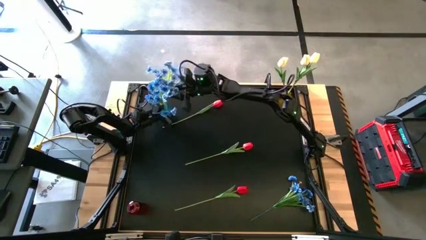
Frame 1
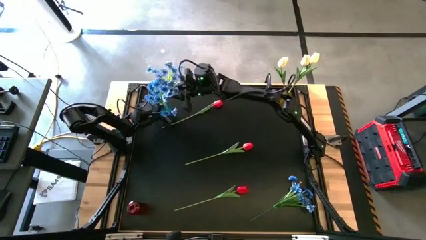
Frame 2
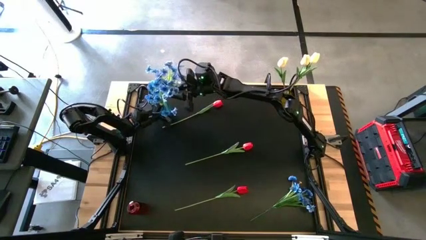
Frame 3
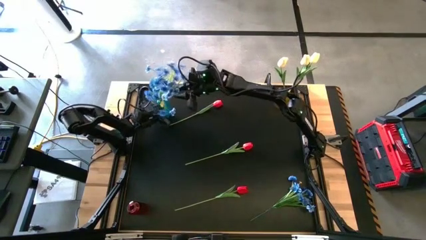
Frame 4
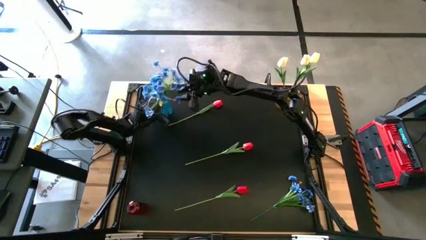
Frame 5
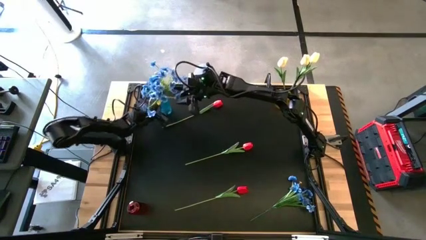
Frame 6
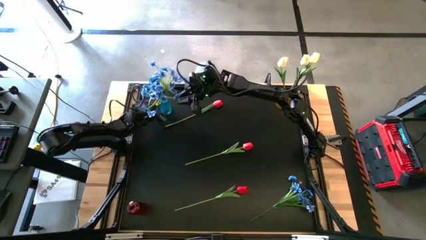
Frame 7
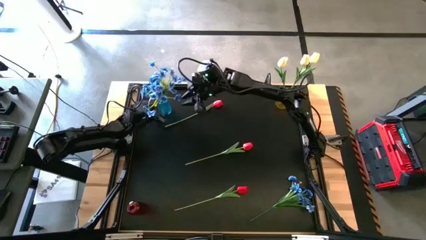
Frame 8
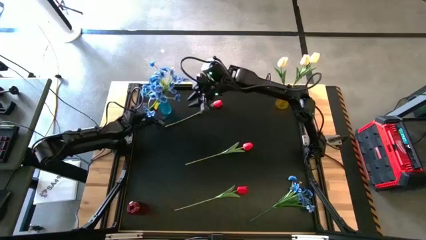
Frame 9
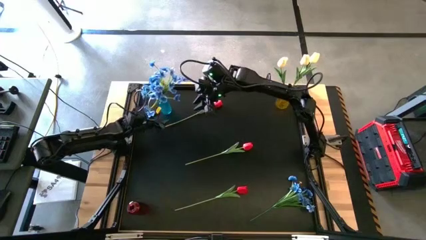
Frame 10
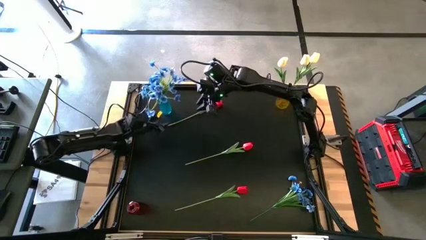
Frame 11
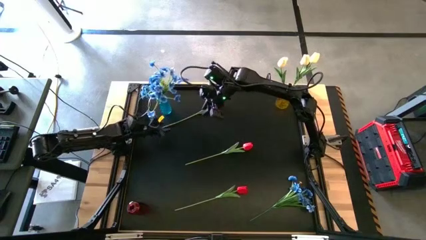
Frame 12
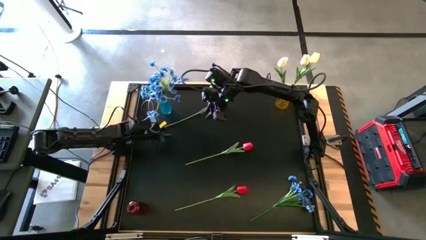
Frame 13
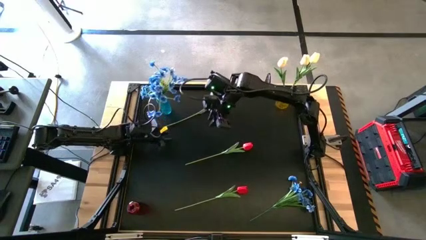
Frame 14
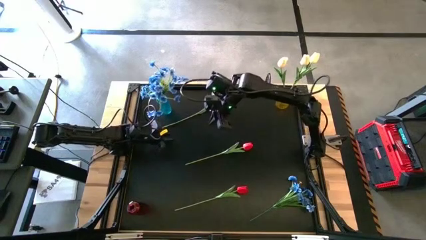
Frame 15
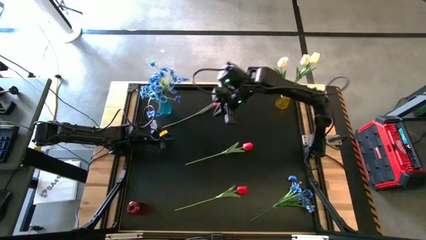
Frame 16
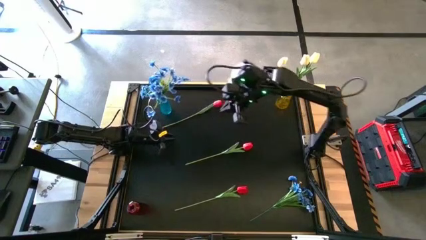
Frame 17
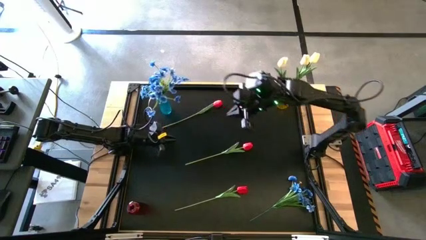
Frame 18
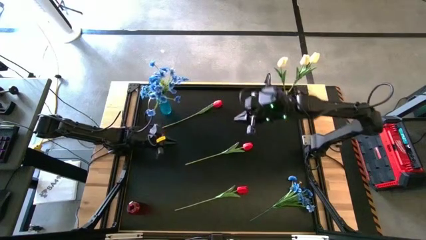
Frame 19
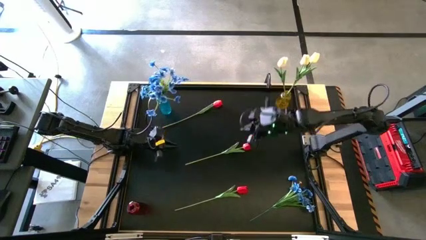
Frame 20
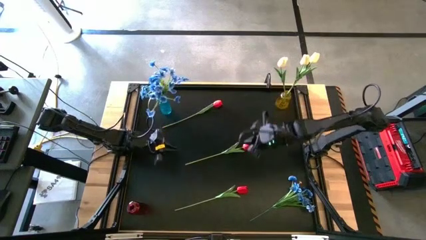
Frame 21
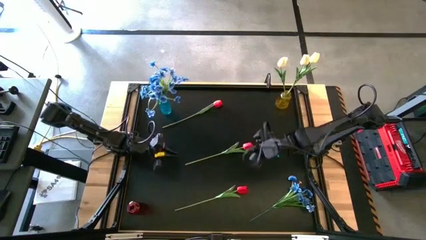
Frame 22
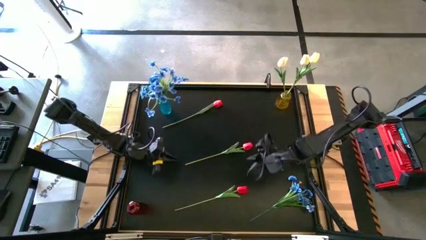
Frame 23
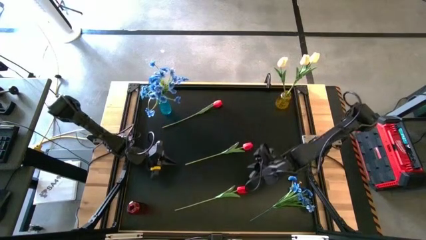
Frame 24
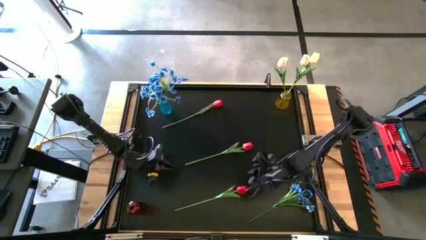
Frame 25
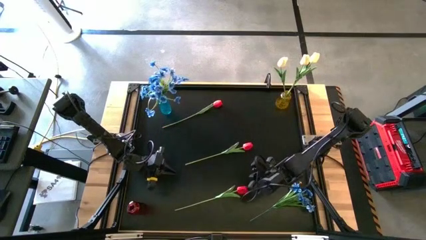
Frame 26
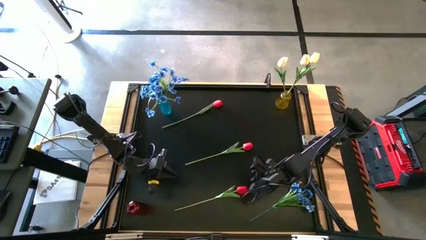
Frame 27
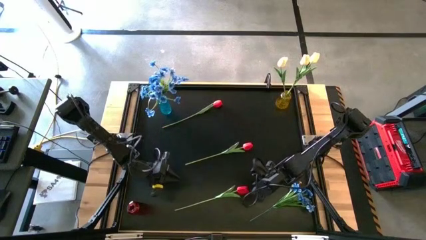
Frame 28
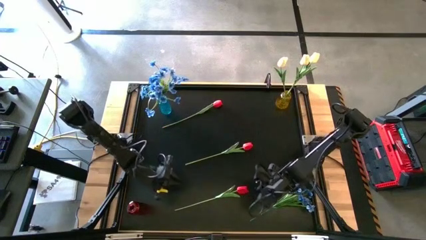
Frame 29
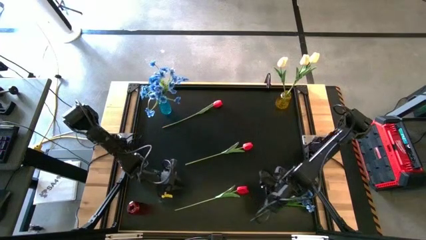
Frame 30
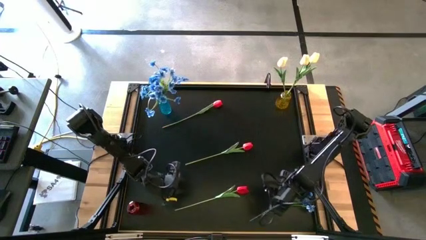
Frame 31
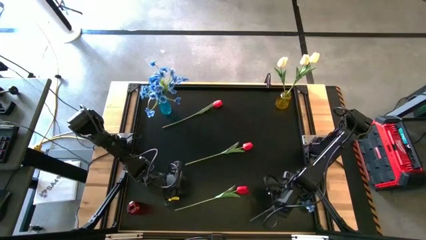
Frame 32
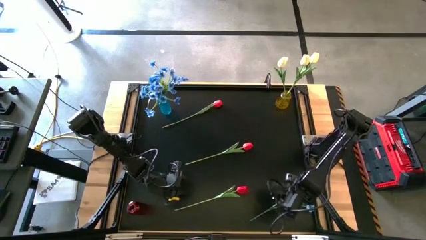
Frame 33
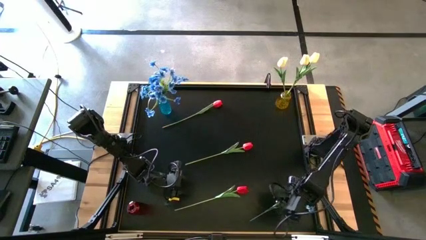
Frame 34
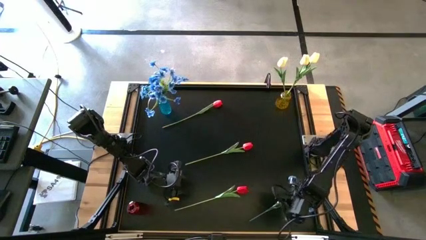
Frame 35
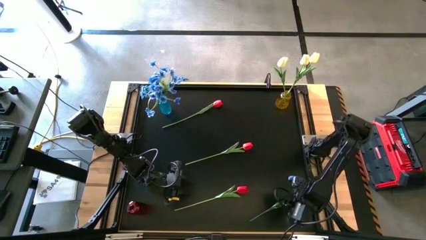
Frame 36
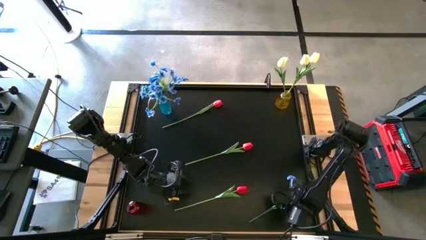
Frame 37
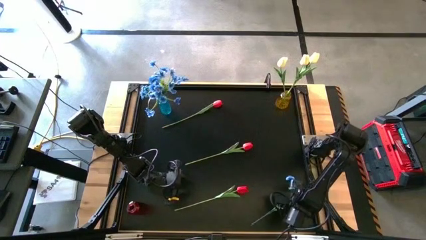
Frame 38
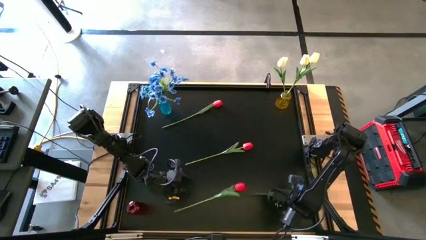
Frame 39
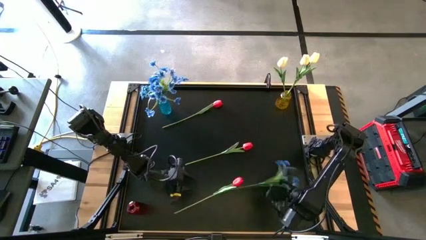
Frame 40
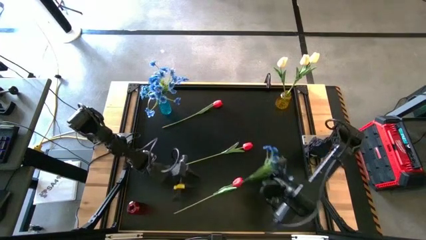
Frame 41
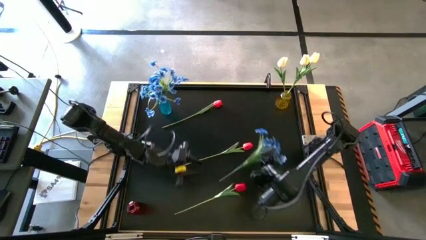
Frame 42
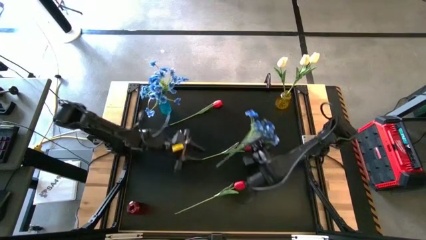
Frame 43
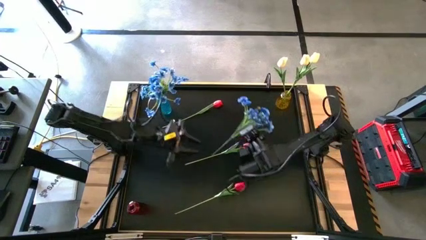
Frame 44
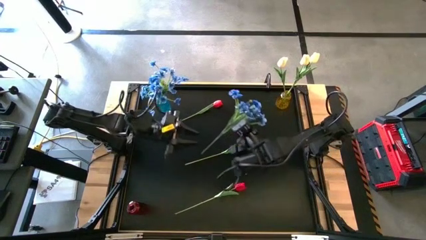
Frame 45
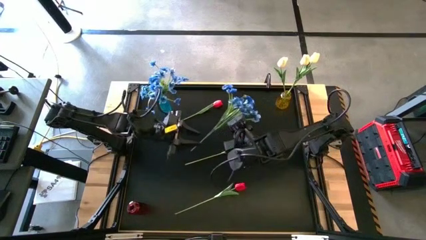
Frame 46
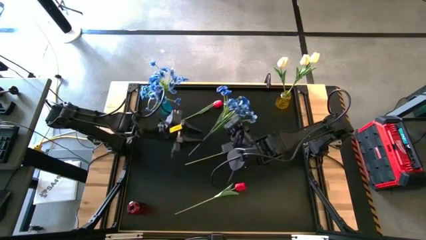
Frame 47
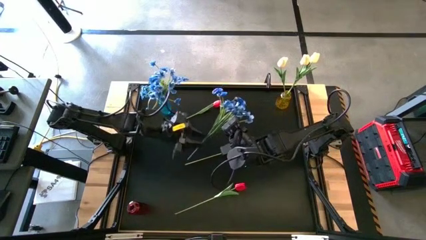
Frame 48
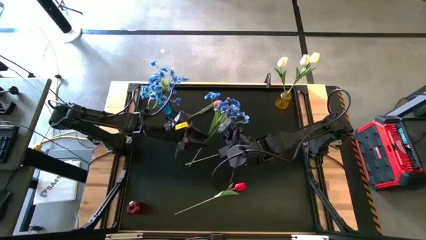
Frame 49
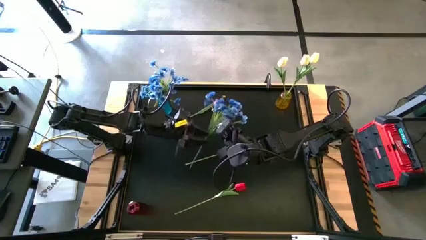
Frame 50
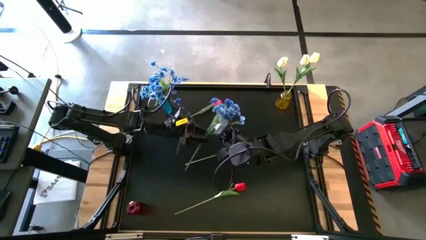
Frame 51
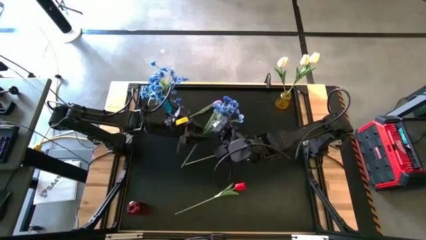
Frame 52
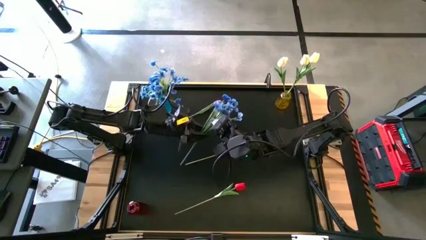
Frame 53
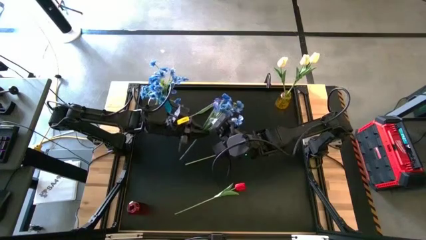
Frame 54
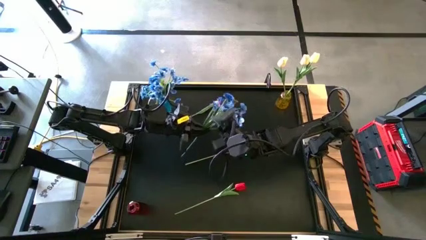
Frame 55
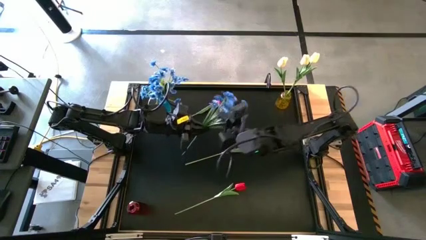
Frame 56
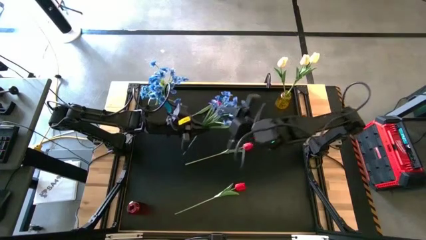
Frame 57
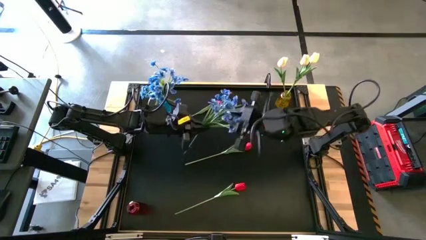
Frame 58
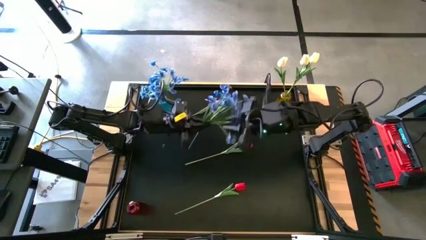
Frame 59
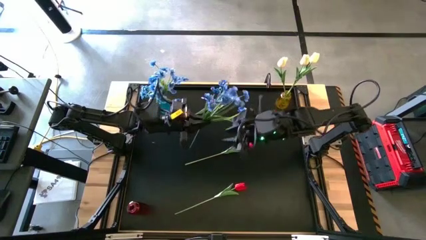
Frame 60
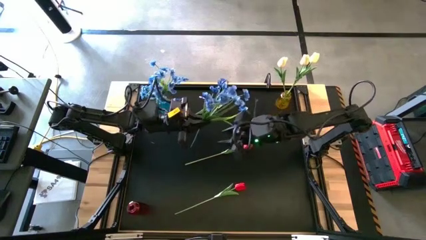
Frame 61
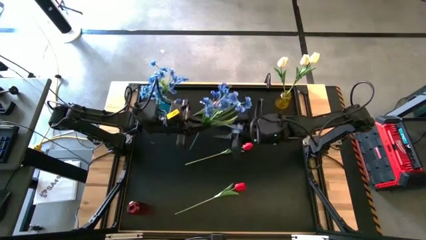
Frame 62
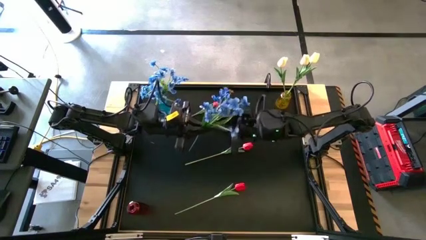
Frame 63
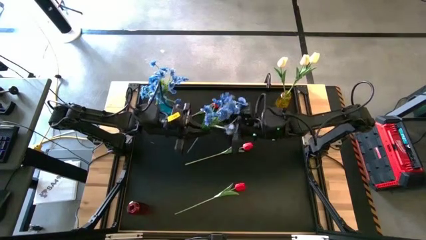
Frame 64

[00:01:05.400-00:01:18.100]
Task: Sort flowers into vase by color
Put the blue flowers into the blue vase

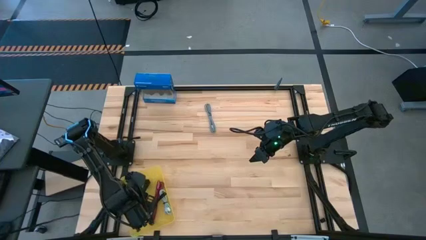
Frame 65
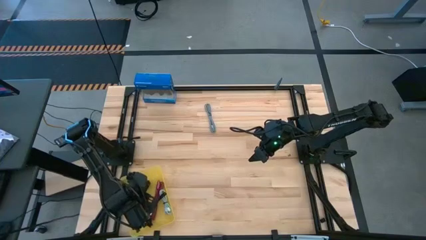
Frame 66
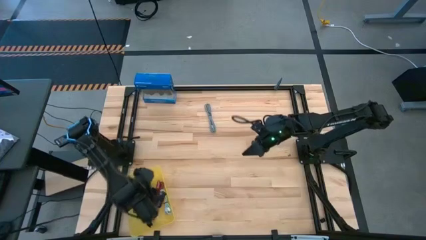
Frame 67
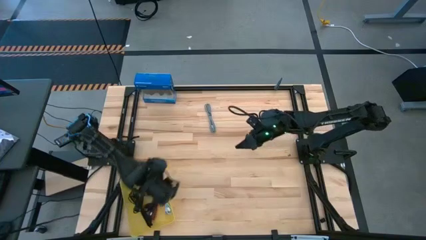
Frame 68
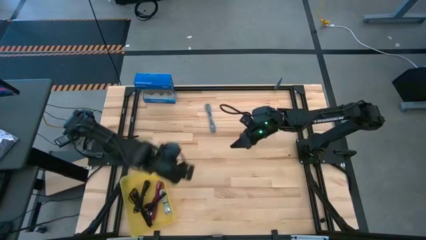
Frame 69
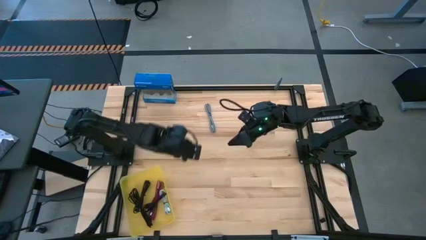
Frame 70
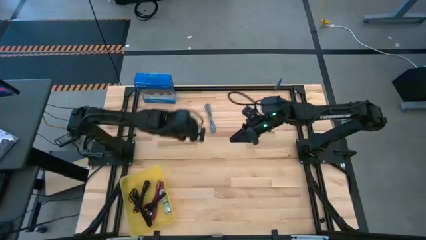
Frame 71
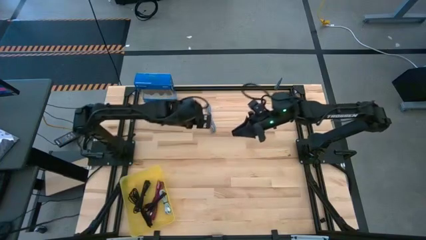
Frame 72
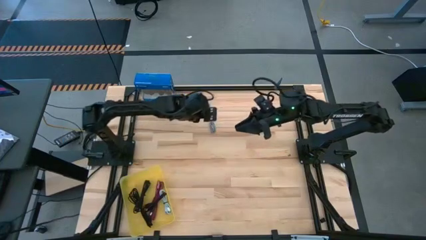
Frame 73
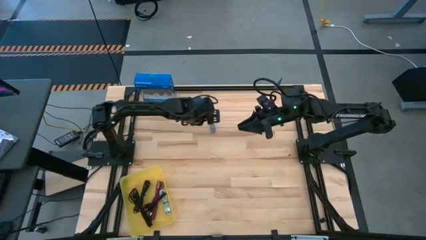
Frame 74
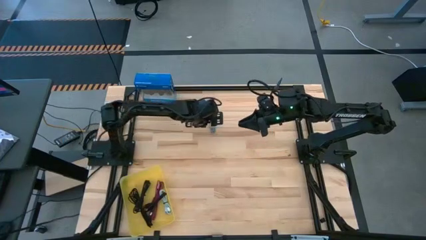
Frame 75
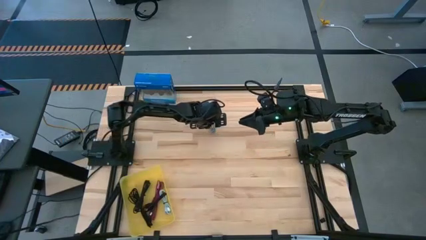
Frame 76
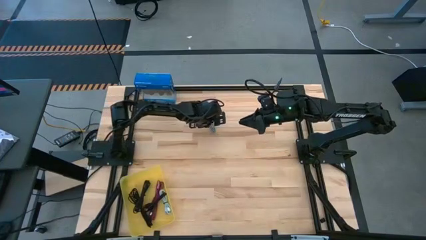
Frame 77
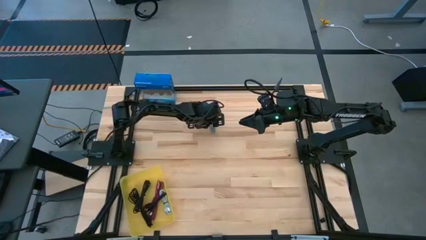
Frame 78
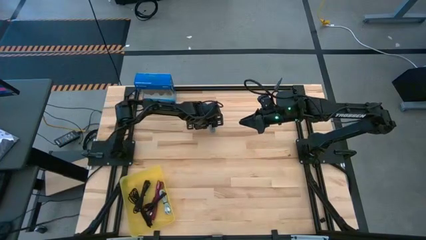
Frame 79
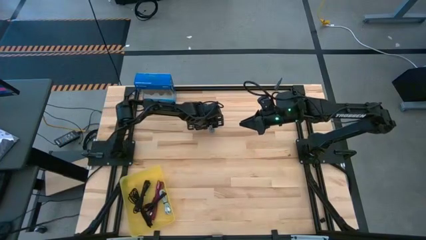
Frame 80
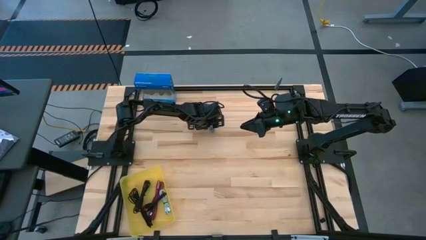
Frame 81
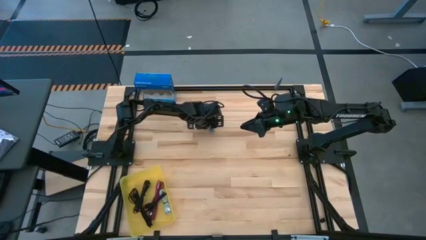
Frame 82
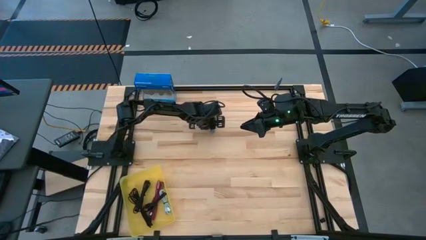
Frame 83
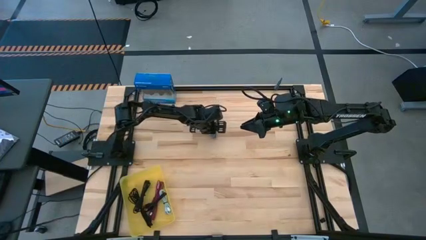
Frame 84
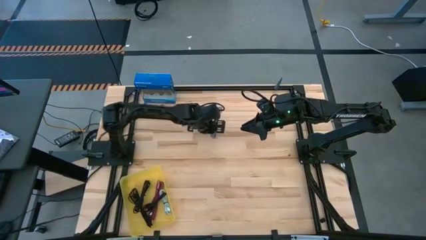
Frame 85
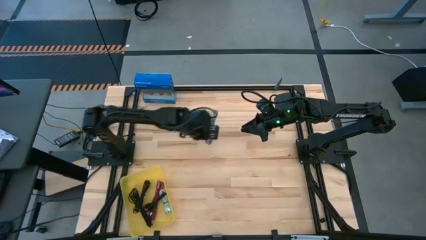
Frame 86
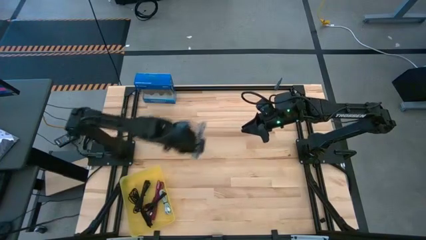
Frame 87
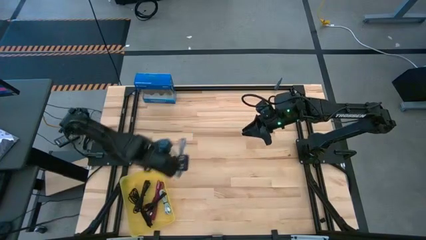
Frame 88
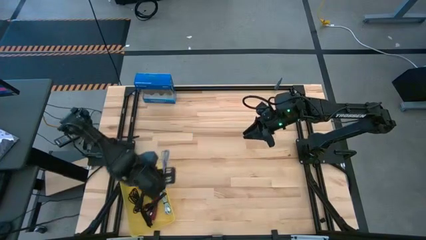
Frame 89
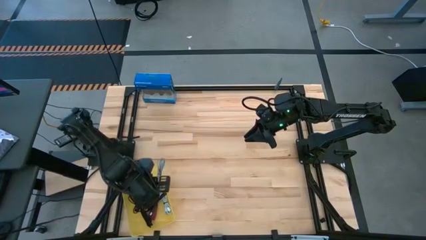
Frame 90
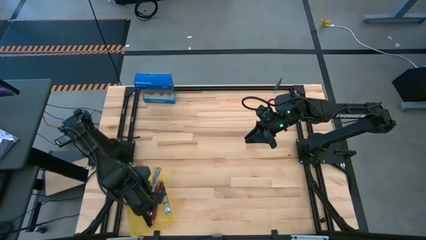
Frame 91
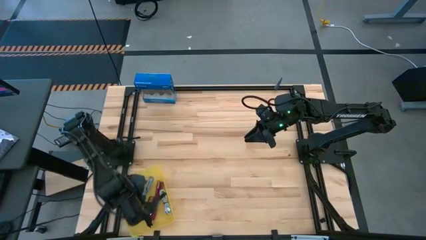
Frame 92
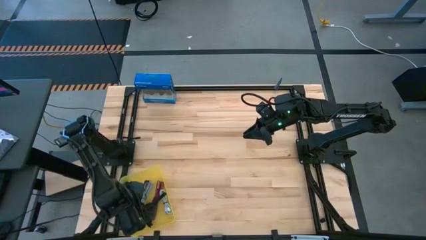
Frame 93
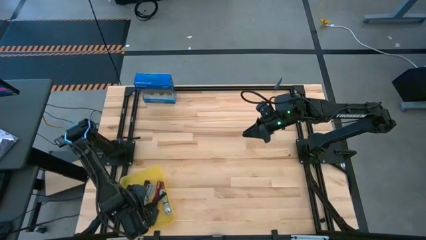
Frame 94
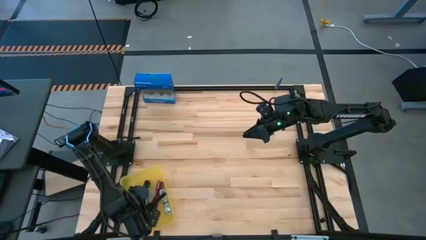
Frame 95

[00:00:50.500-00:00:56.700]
Task: Pick and place USB-C Cables
Put the white charger cable into the yellow bin
